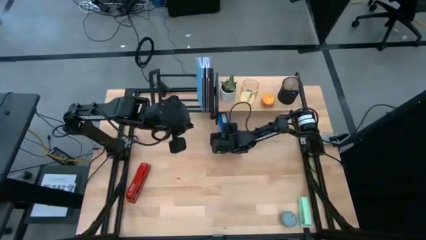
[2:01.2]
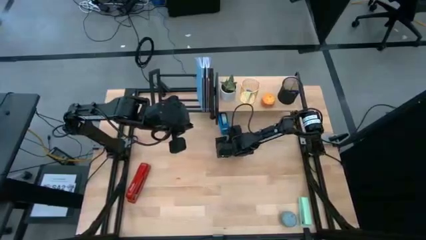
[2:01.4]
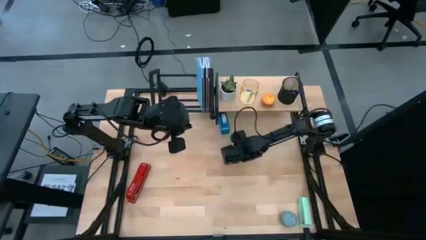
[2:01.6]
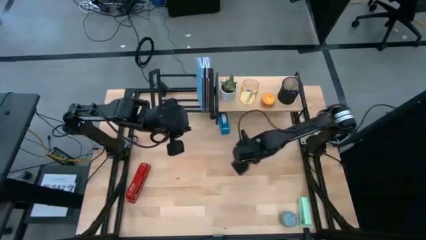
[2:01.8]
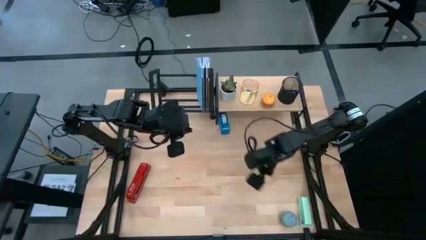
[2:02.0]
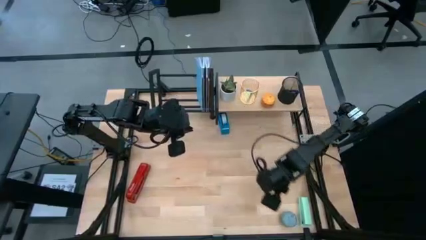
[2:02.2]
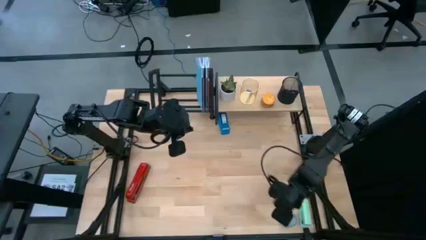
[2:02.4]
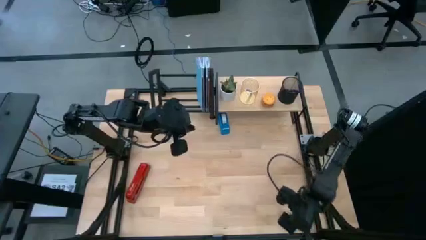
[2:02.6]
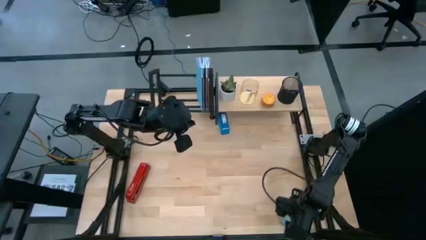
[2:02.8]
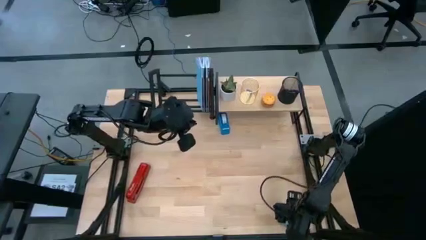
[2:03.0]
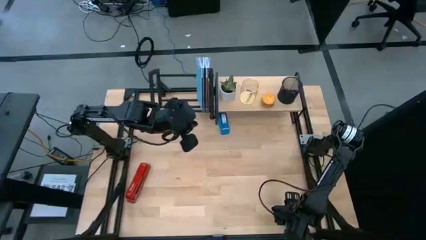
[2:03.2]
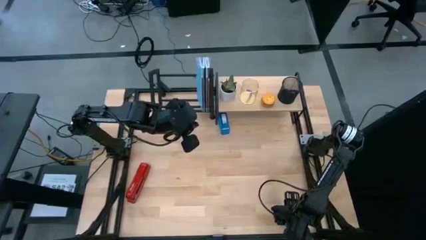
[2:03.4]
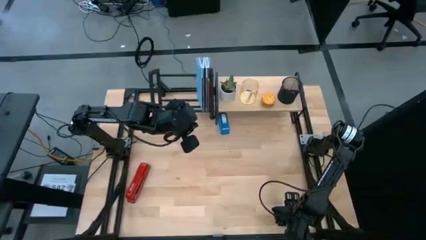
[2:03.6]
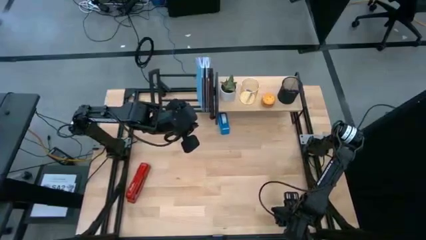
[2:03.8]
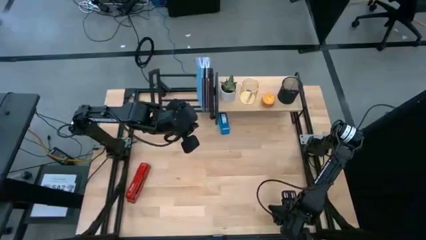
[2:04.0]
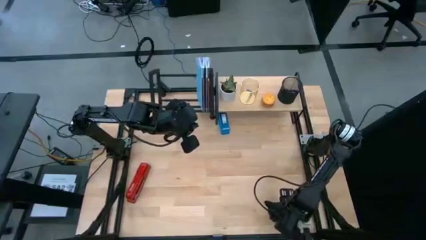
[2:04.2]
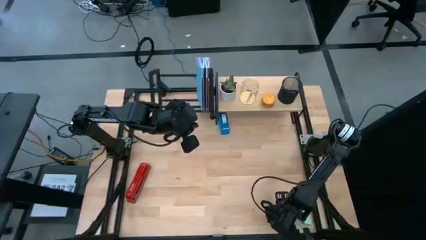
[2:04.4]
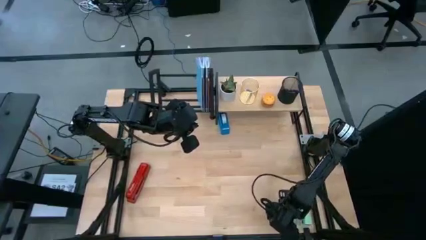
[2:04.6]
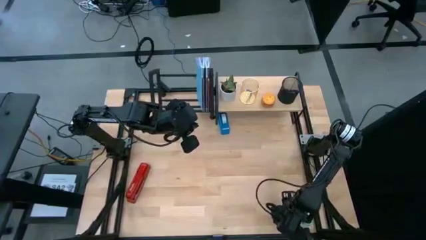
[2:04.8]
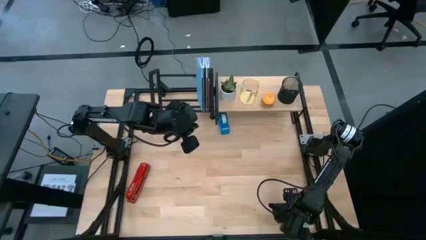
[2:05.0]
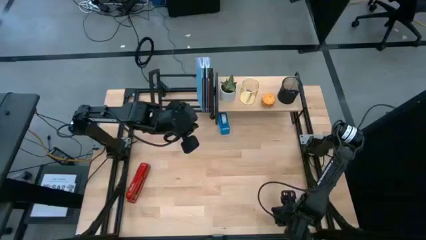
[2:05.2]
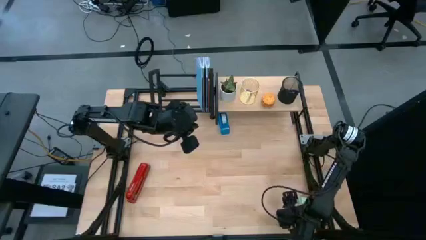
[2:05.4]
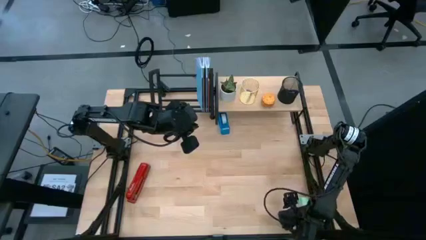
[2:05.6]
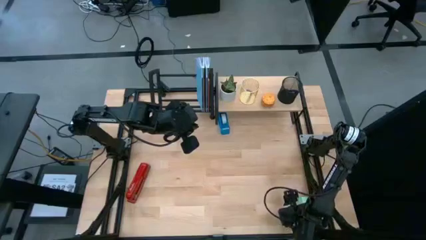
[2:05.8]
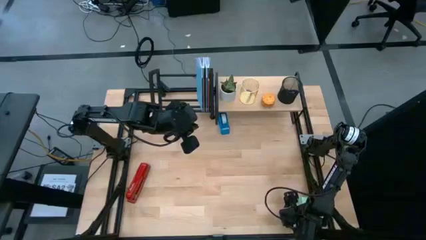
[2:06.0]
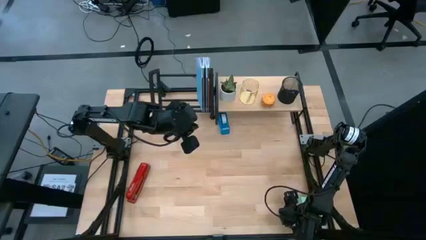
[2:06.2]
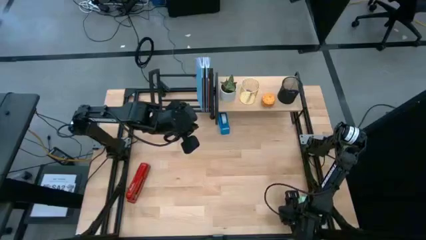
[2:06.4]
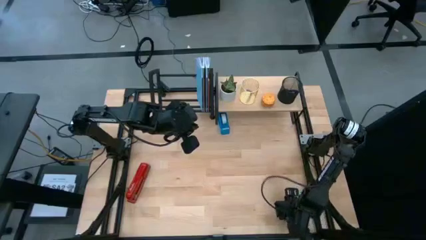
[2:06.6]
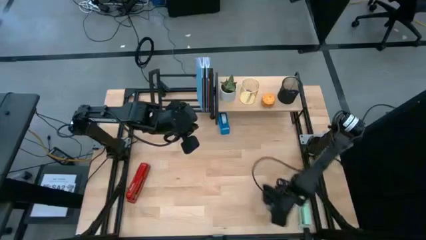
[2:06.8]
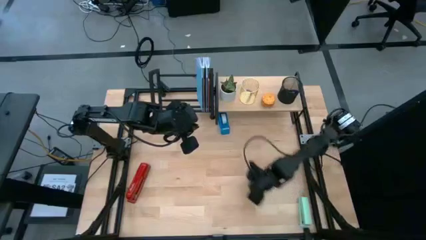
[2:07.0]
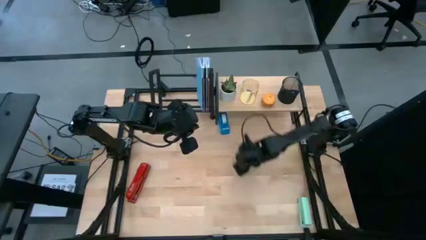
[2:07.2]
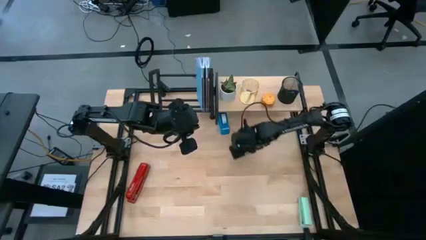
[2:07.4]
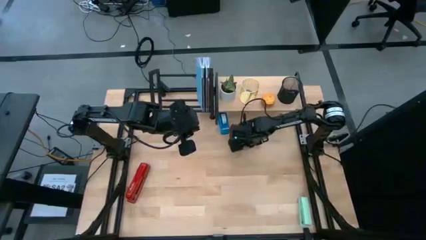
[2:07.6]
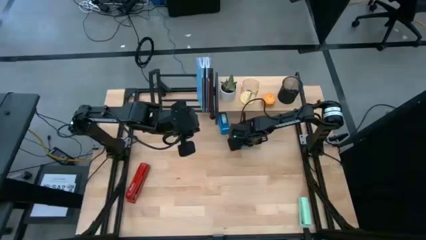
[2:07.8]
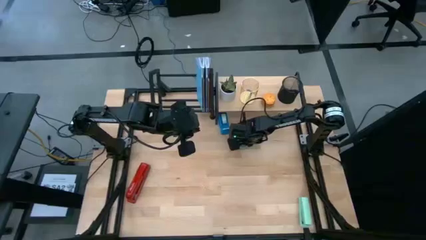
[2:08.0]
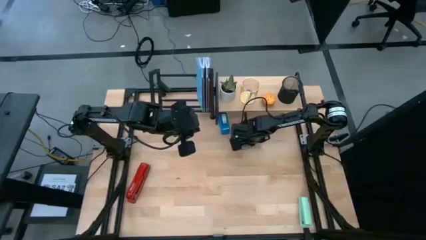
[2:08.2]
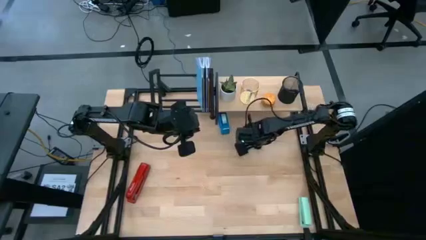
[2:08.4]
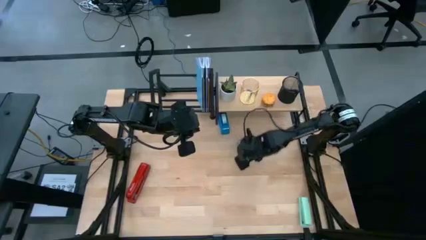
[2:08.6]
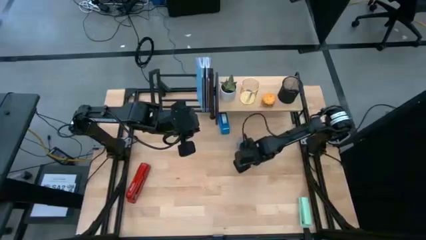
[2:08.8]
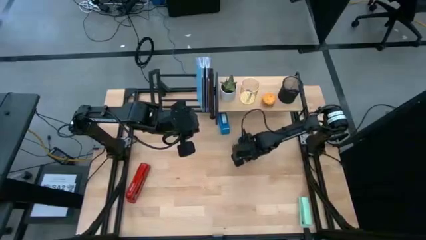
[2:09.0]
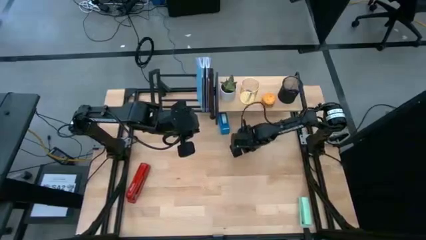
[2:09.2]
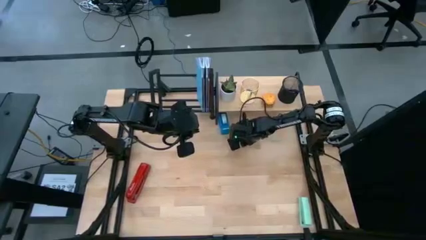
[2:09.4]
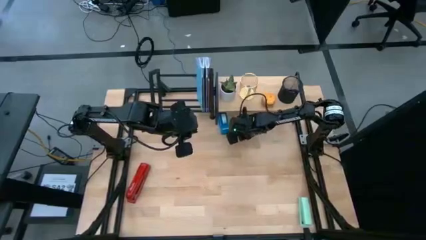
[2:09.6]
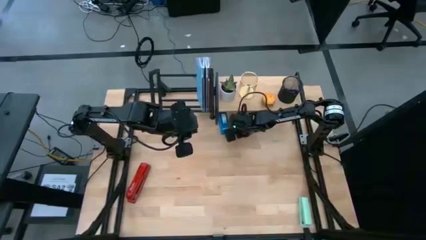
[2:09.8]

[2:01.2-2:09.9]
Task: Stock shelves
Put the blue scented candle under the shelf

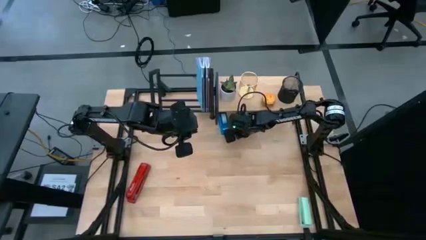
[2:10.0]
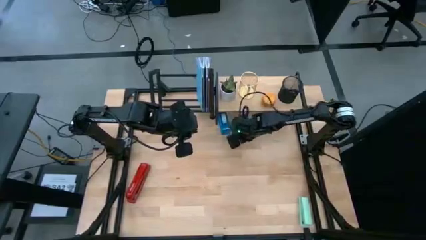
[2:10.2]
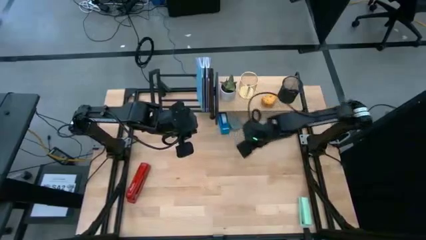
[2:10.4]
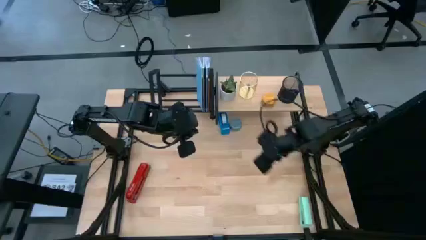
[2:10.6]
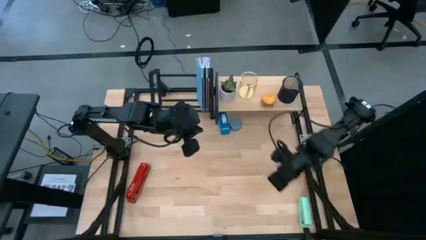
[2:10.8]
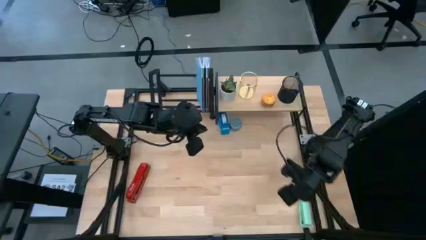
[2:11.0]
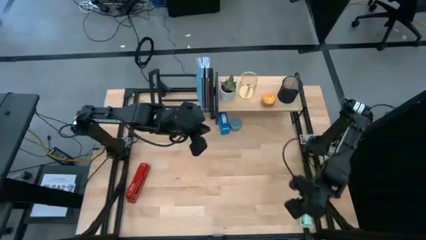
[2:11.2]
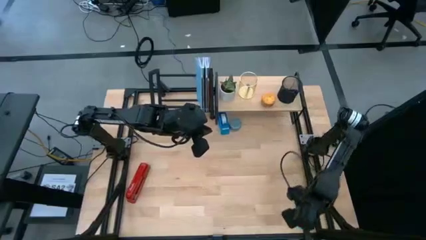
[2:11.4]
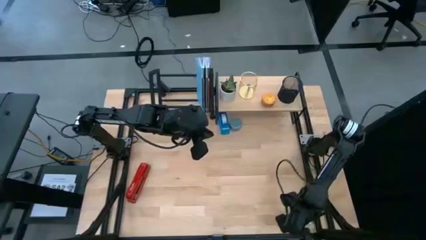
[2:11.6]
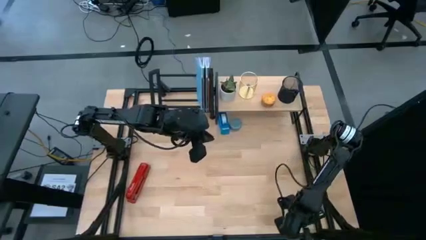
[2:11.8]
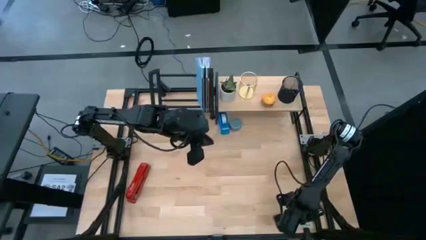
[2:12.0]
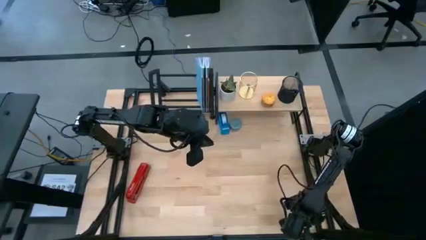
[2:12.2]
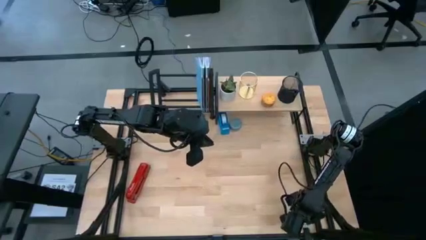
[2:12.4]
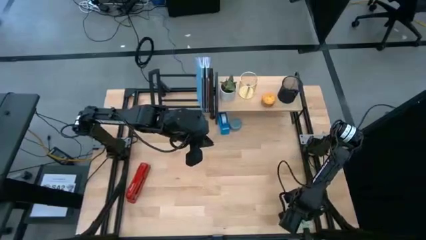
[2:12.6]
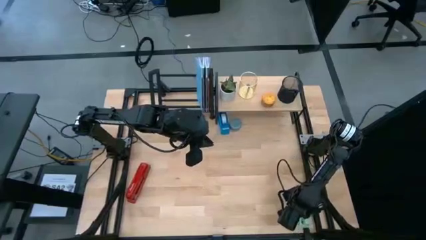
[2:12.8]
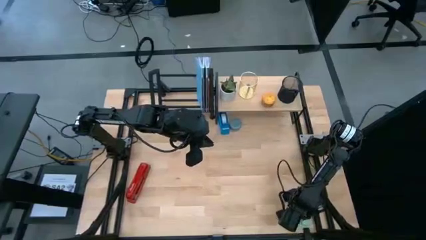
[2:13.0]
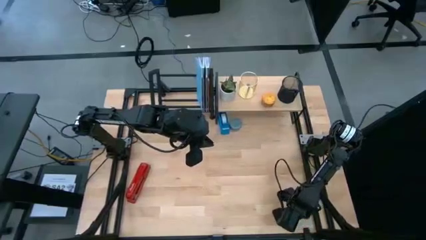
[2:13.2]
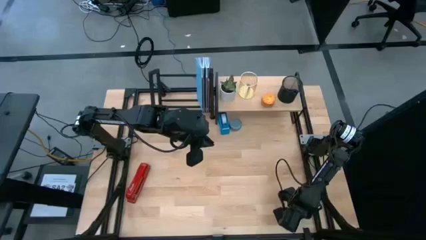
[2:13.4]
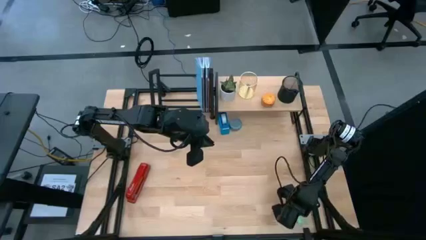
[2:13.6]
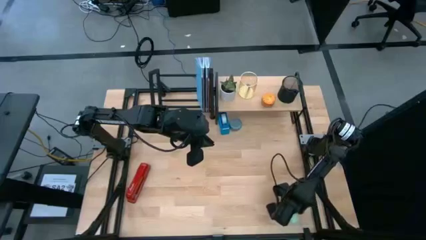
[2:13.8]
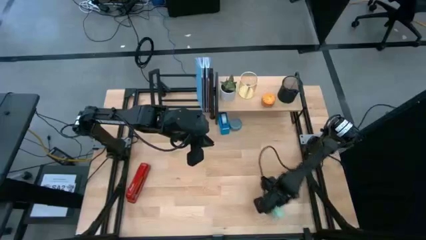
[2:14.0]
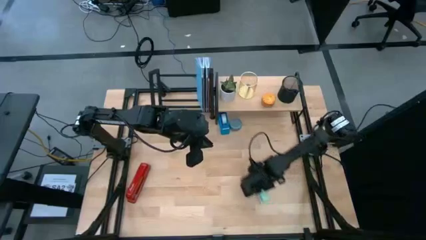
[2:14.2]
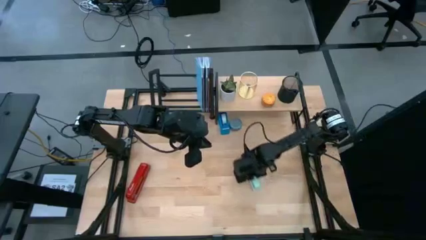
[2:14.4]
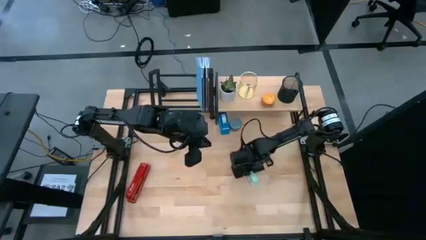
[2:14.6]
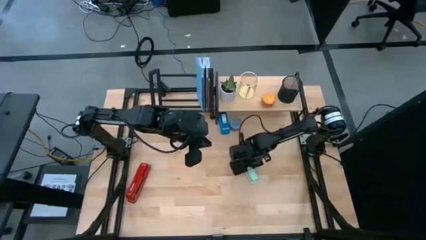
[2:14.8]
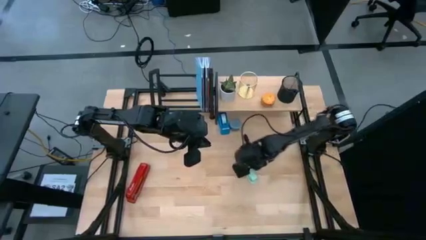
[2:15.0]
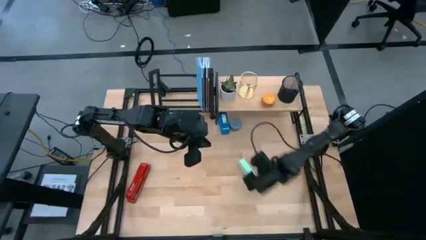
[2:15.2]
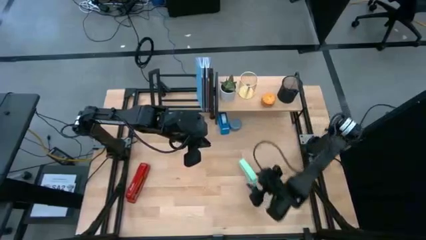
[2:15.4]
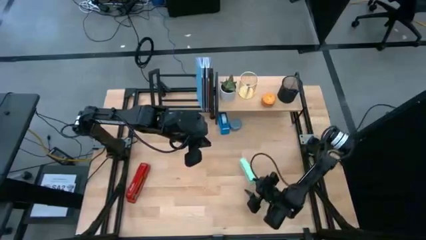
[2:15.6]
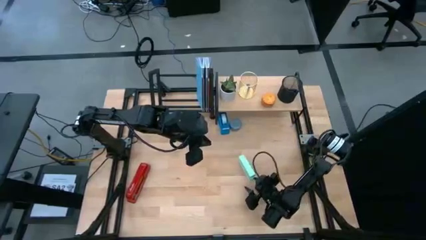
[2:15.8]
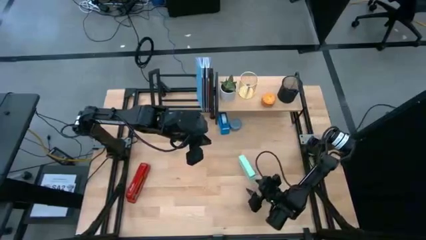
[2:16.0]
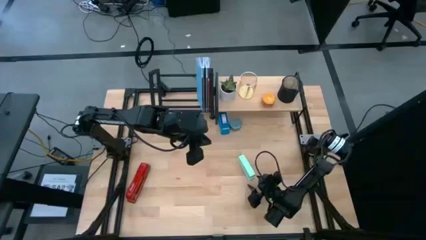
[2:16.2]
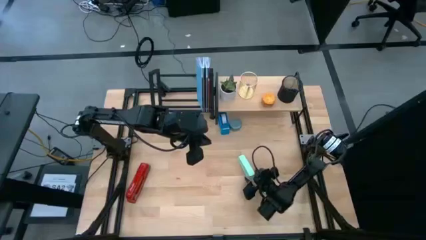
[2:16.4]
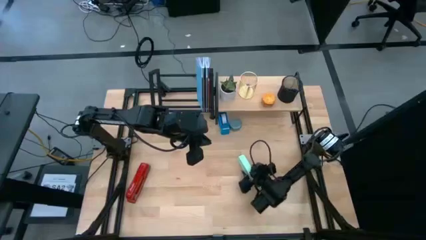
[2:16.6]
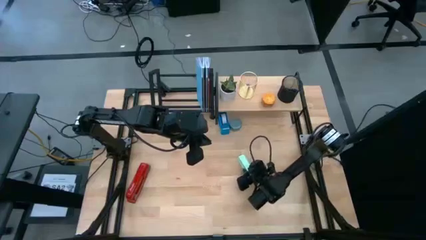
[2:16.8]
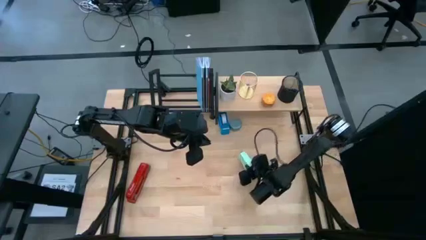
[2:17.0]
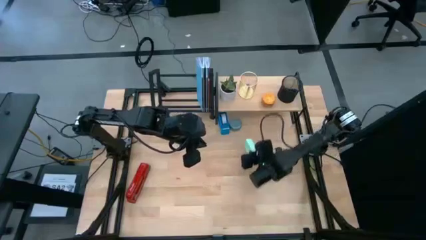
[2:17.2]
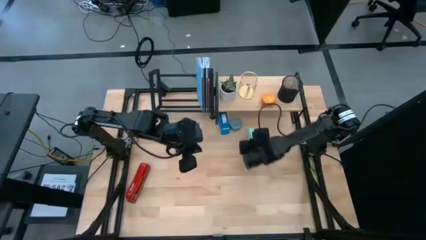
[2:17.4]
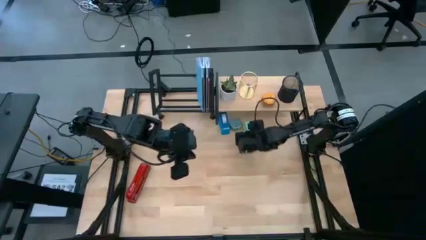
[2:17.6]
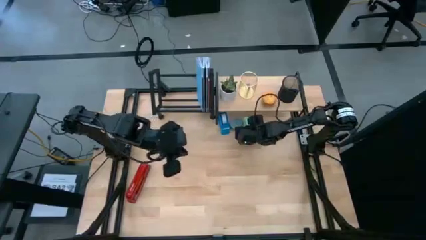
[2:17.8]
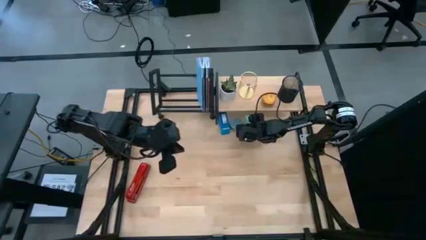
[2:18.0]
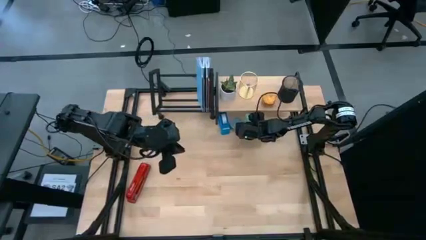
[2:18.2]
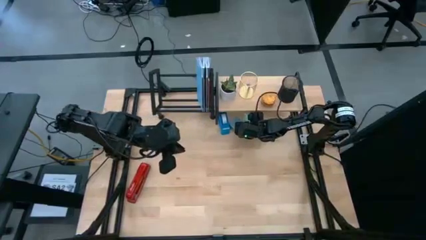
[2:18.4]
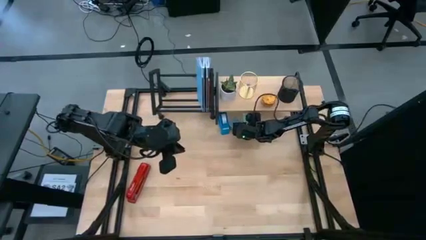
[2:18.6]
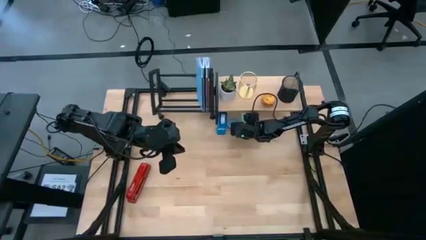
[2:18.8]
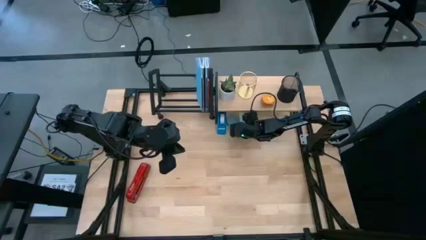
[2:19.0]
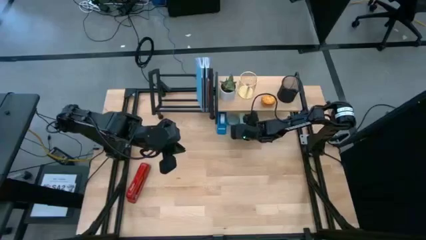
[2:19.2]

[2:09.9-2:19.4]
Put the green stapler under the shelf
